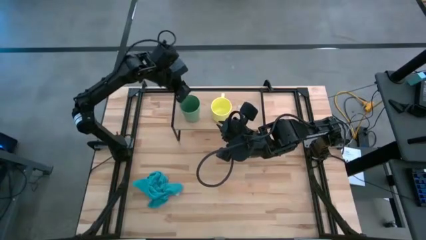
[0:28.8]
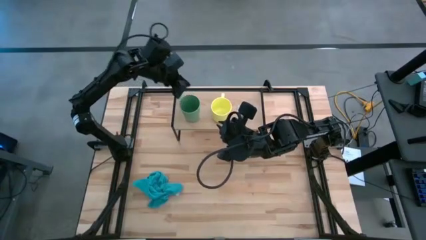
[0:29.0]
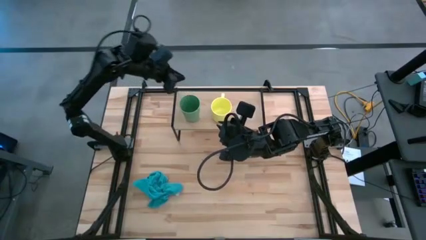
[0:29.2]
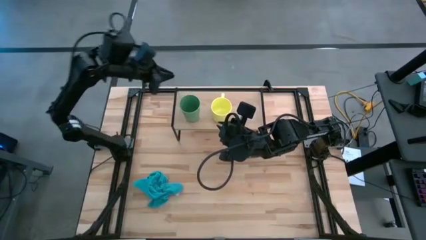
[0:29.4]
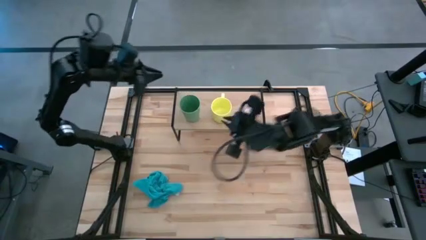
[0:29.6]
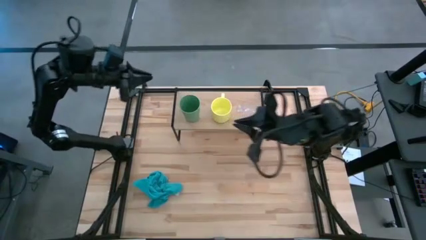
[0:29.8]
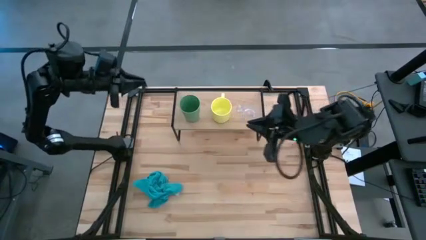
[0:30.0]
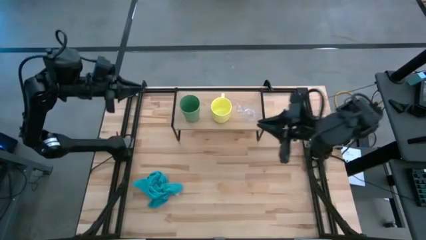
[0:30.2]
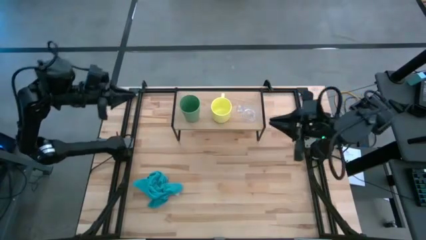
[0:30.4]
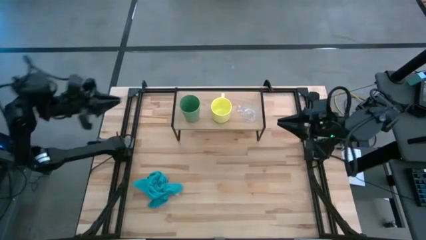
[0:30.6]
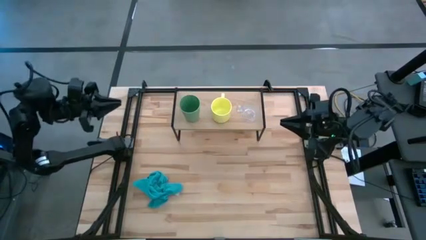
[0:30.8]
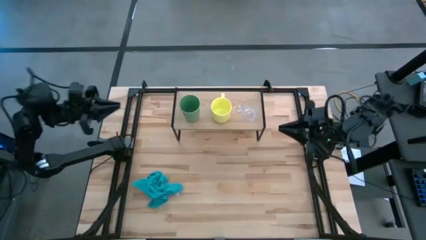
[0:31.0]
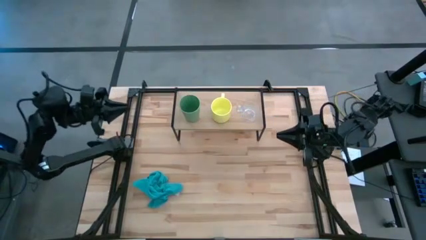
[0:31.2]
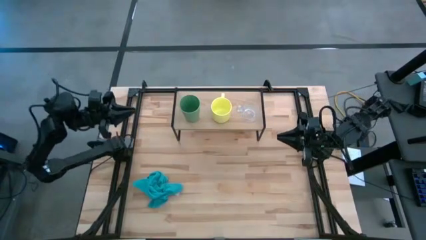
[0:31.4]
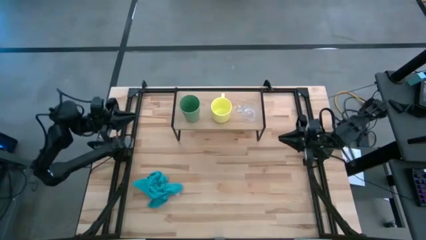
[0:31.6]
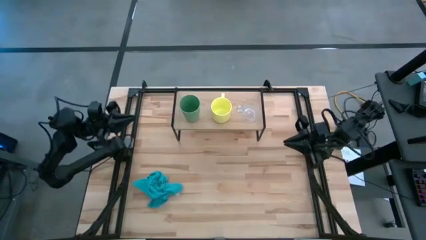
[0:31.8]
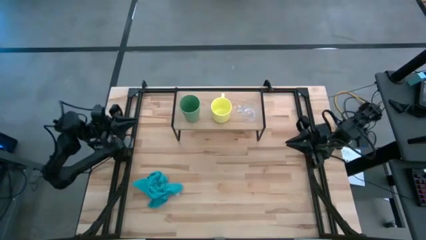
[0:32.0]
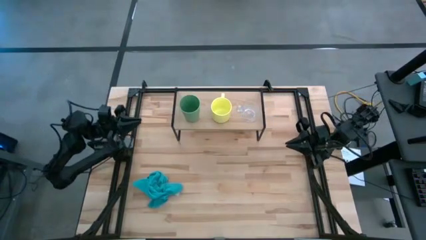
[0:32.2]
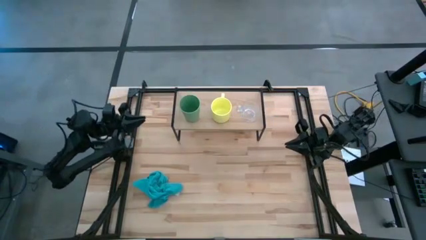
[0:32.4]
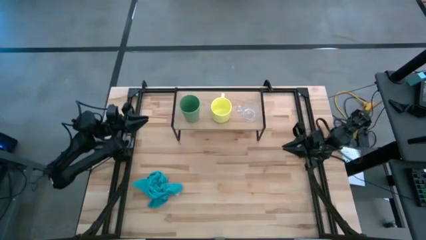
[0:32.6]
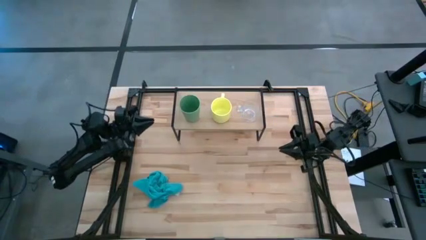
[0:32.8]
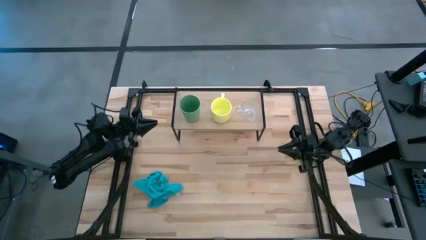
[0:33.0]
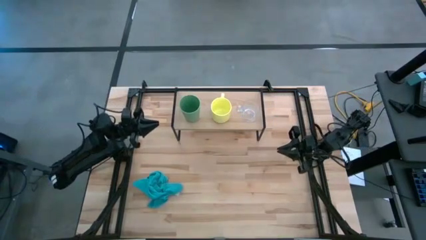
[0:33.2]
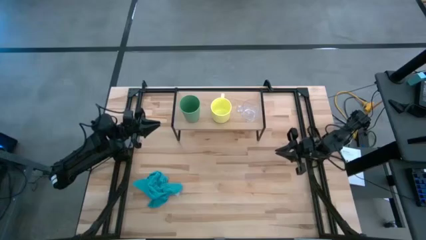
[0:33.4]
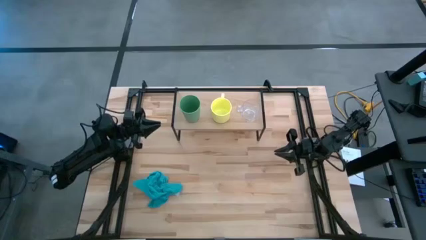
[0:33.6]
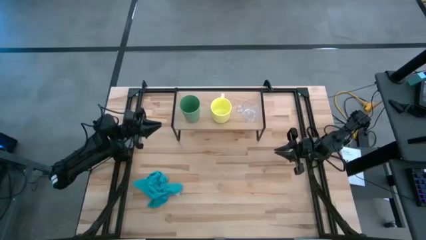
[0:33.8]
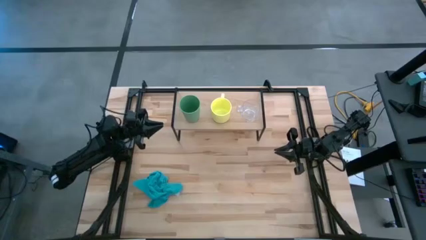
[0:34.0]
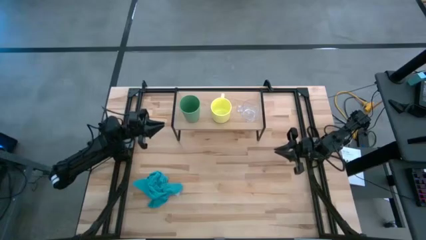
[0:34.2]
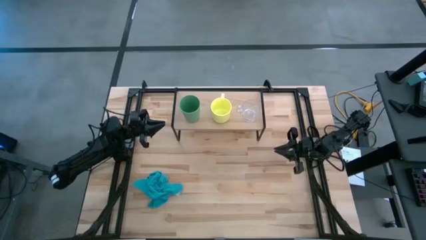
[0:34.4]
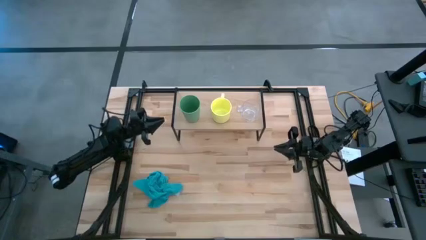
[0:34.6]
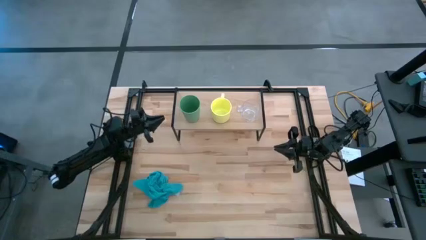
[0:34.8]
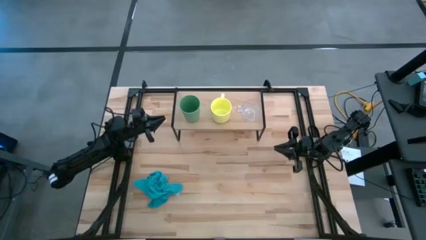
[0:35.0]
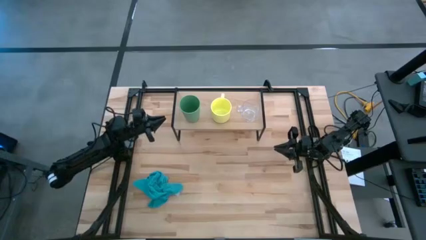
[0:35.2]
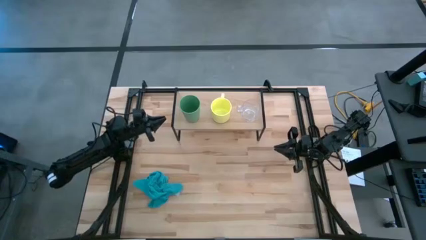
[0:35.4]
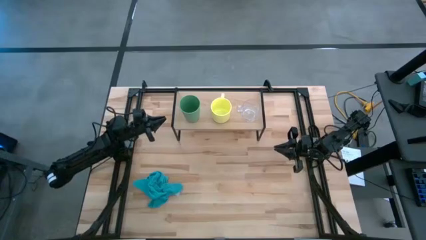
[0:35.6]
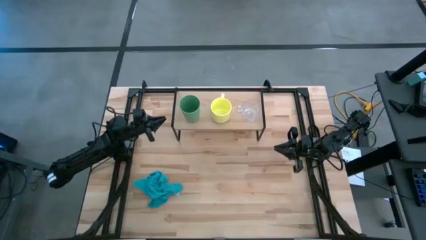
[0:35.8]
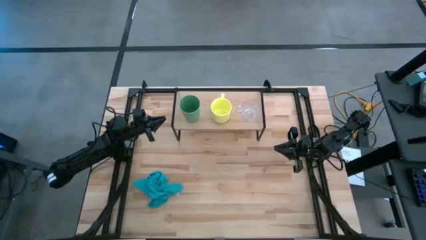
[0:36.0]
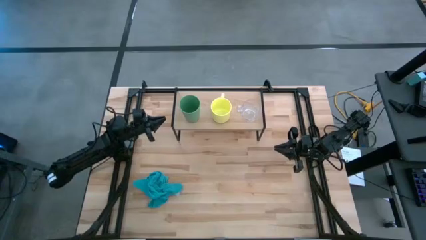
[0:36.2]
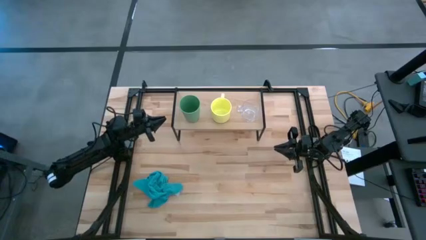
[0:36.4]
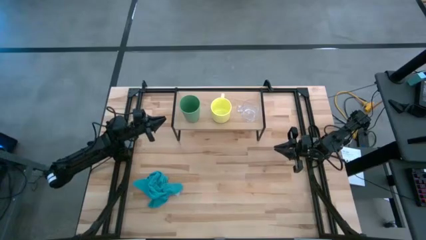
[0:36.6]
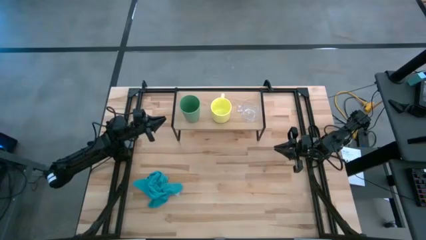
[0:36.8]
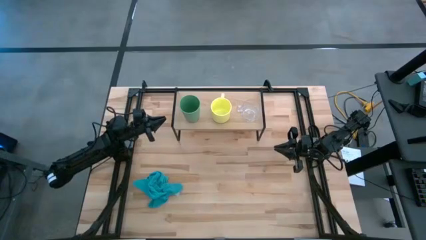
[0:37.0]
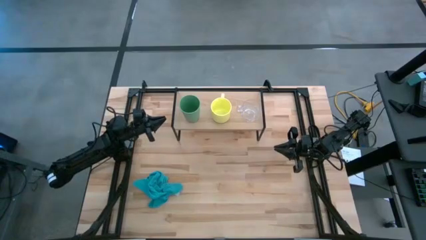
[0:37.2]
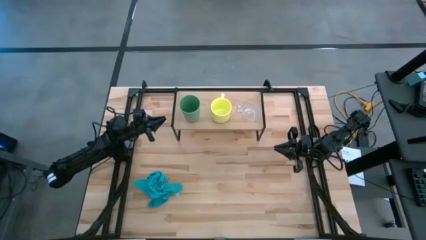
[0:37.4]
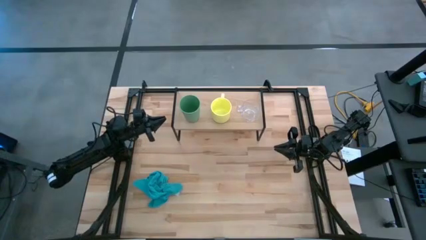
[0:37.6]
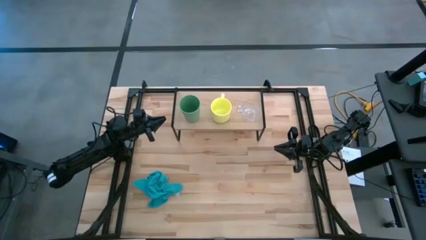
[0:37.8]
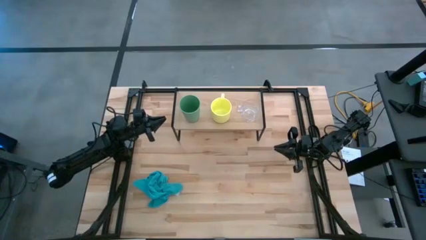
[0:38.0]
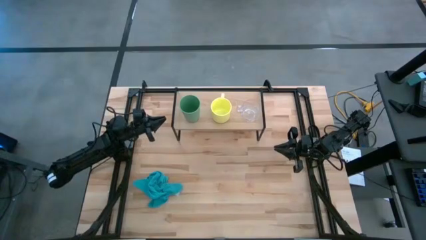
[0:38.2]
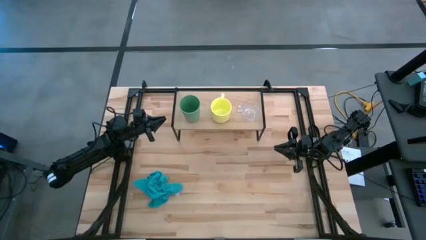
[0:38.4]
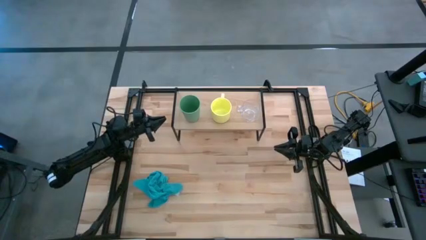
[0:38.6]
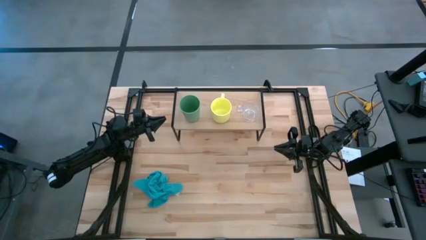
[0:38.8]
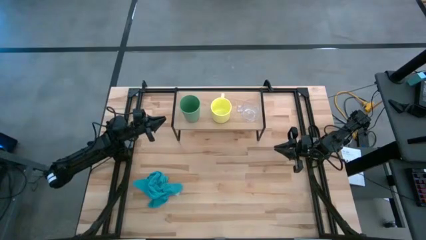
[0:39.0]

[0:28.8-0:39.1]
Task: Stack small to large cups/mugs on shelf
Return to Home Position

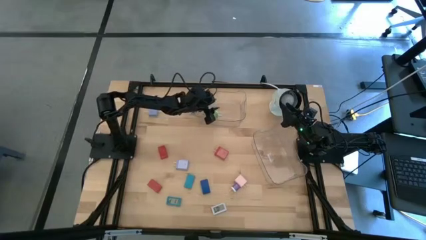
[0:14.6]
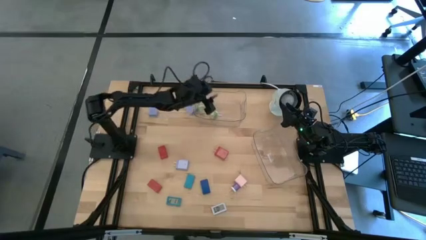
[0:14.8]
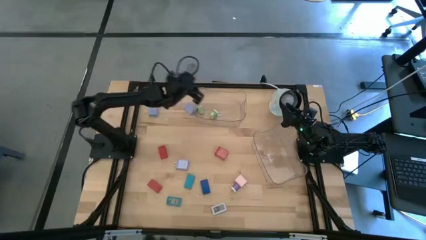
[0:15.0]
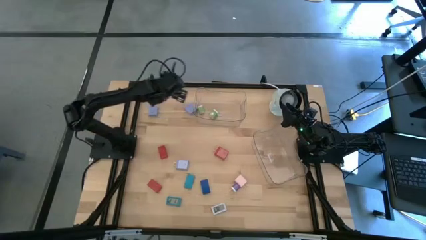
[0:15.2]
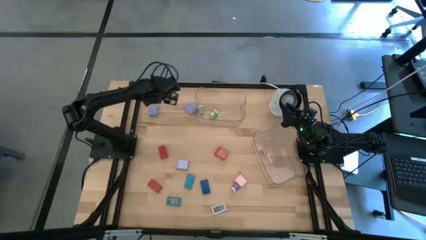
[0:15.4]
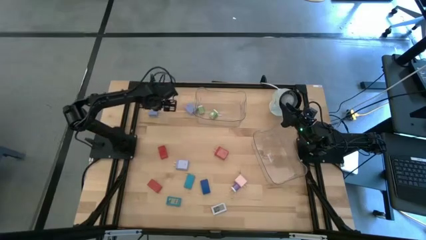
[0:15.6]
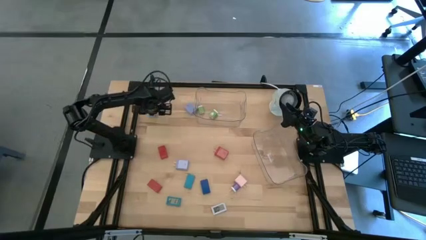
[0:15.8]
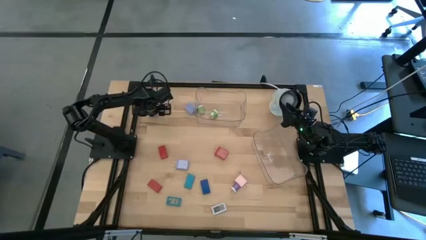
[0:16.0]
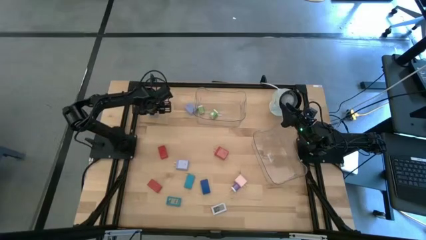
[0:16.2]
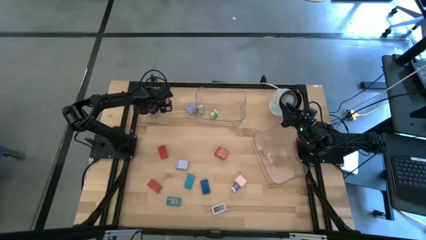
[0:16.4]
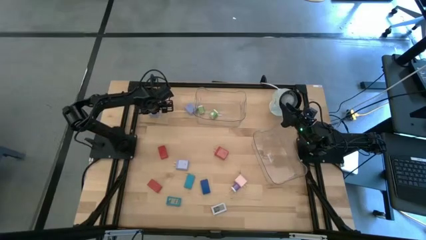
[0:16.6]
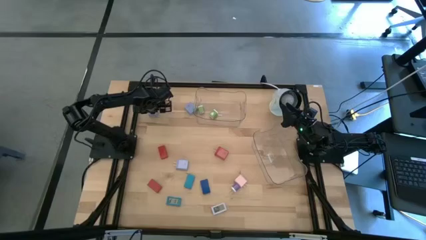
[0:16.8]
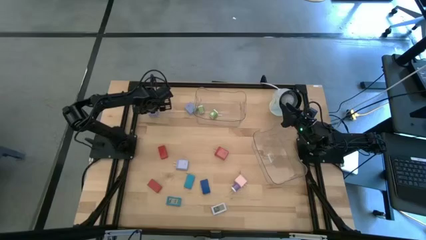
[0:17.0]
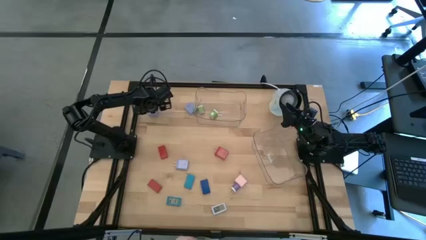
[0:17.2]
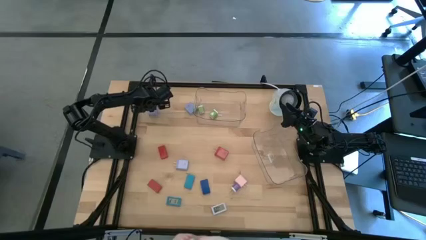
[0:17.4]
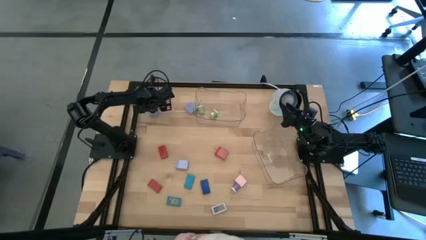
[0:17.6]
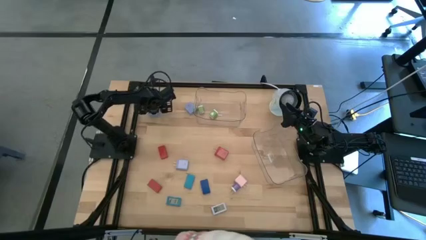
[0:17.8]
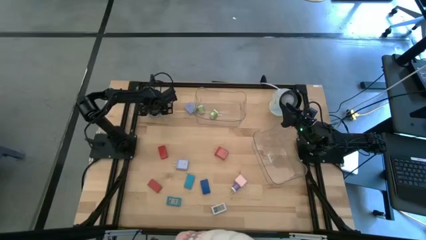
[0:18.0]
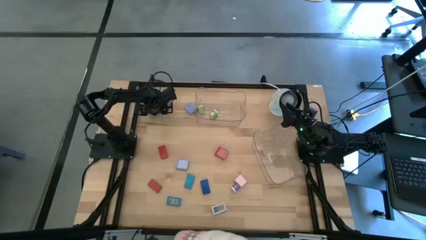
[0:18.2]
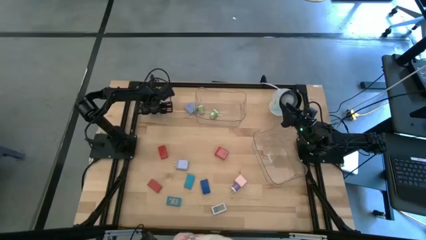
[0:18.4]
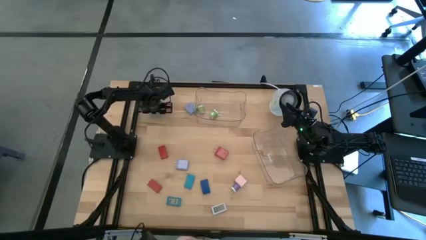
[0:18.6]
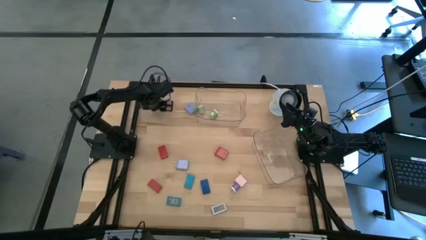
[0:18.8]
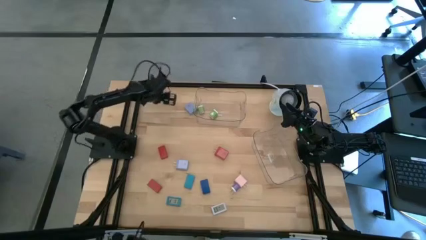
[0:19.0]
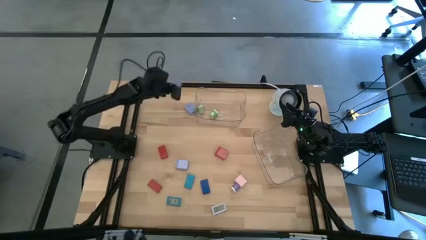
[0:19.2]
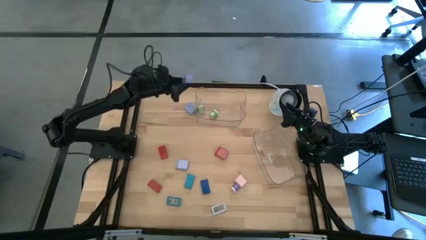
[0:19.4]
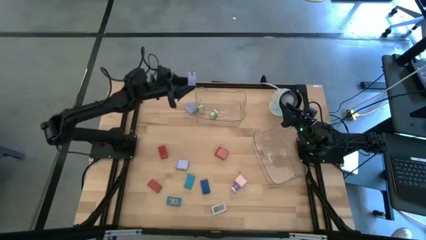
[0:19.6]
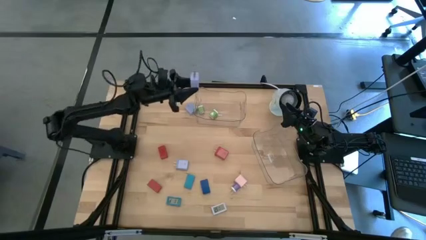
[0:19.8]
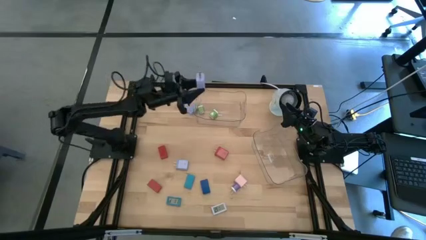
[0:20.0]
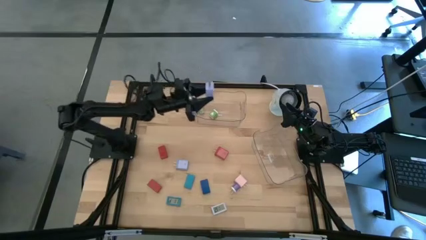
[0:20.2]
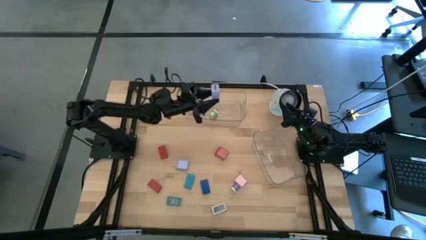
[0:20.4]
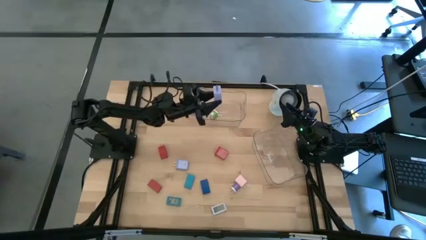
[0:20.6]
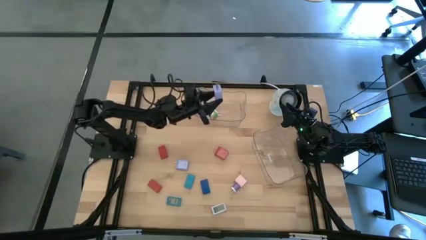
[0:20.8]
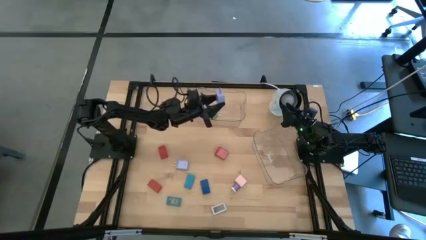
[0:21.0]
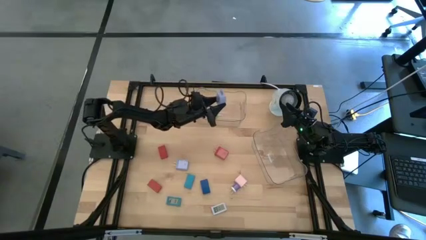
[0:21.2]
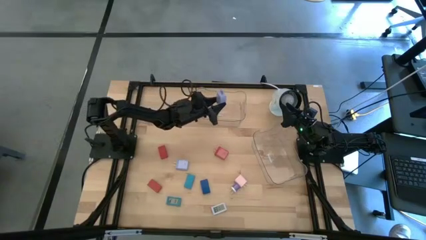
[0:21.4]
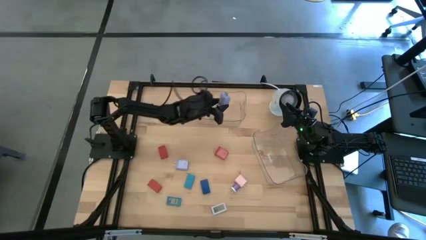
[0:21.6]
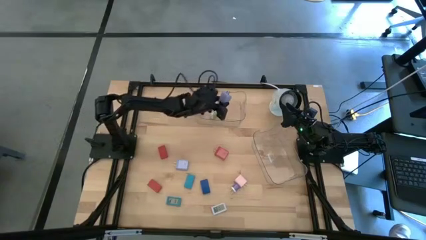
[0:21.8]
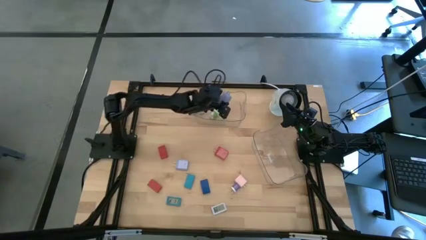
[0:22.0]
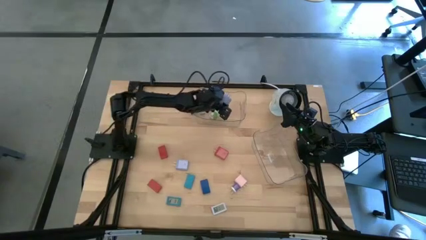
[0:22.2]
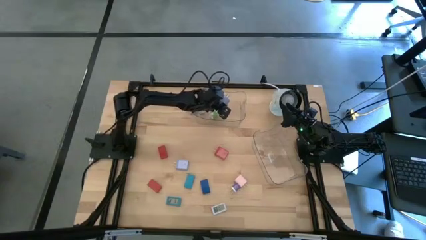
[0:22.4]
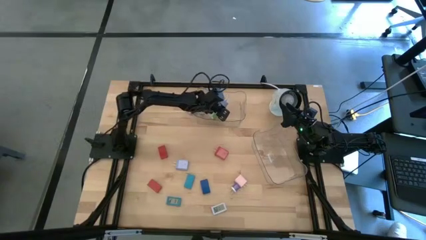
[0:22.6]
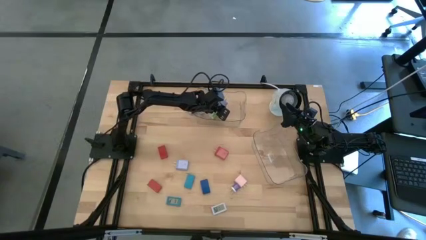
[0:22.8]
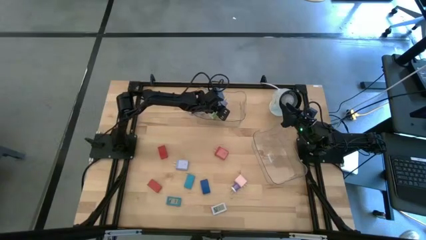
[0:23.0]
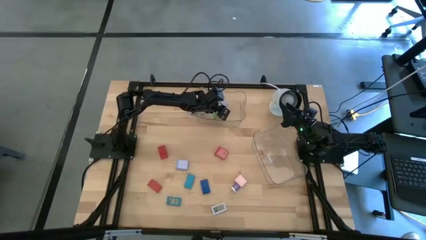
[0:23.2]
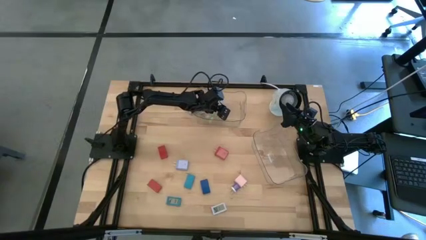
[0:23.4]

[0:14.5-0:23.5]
Task: Pick & Place Office items
Put the top left large purple charger adapter into the top transparent bin
